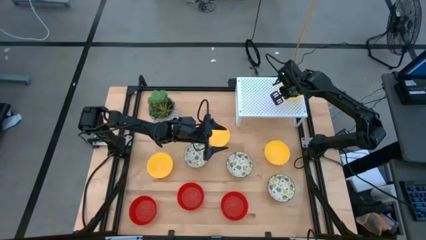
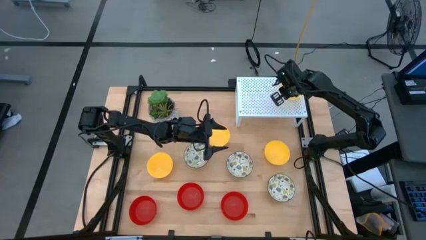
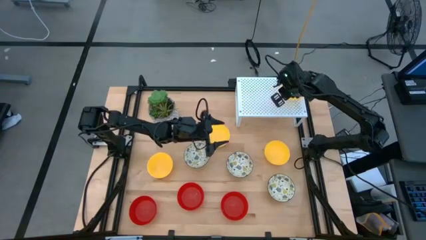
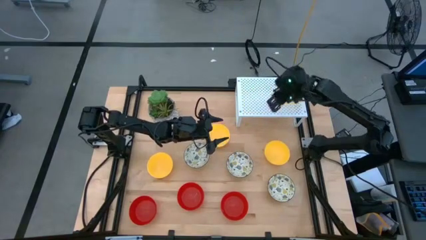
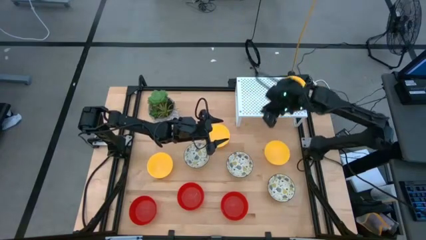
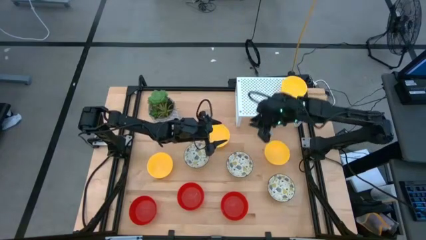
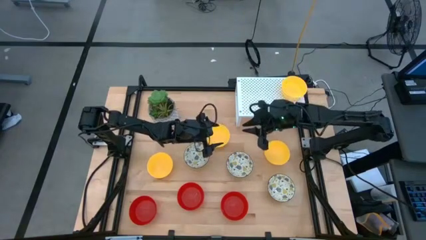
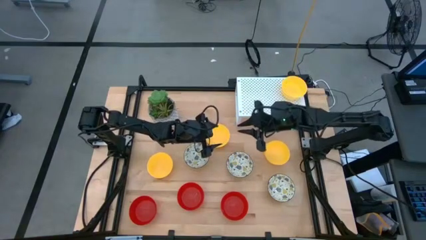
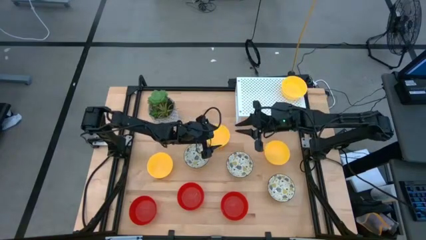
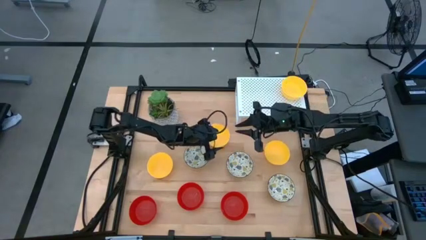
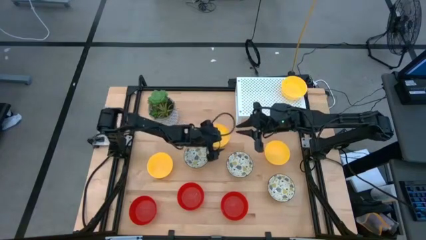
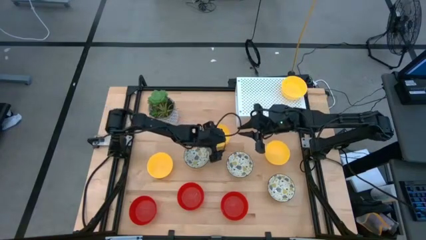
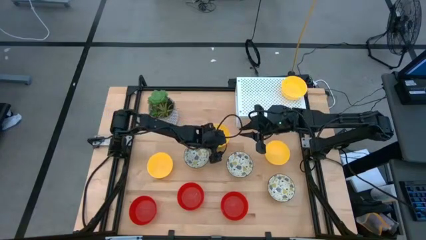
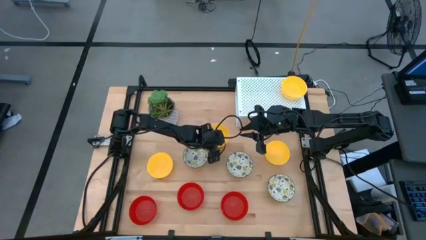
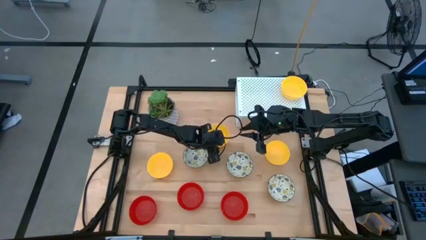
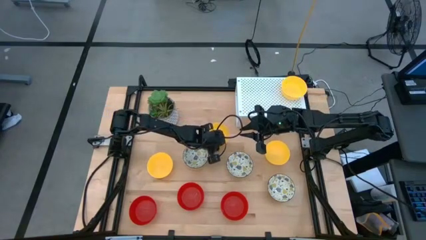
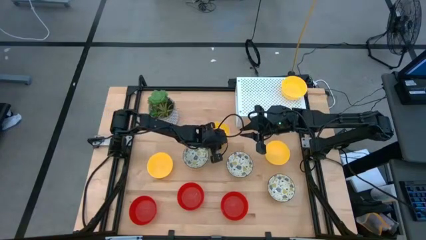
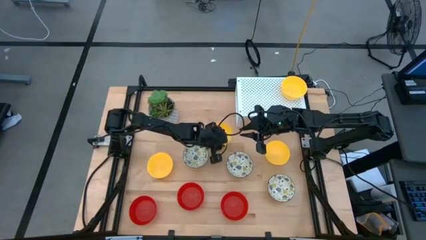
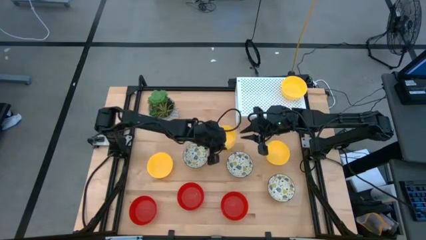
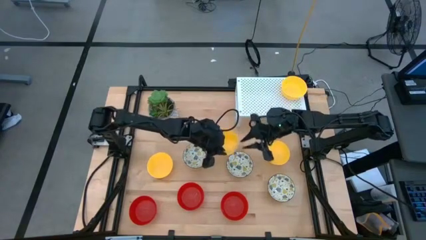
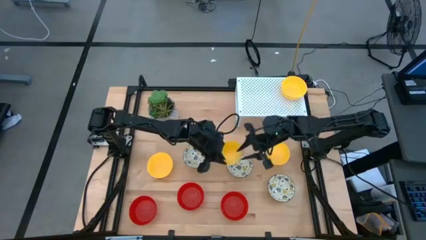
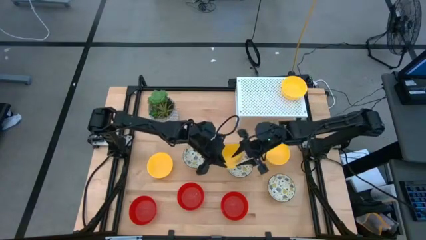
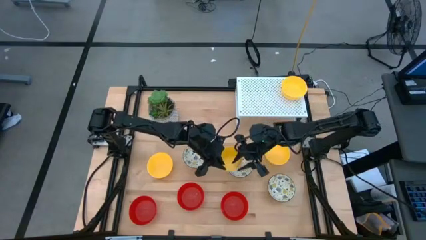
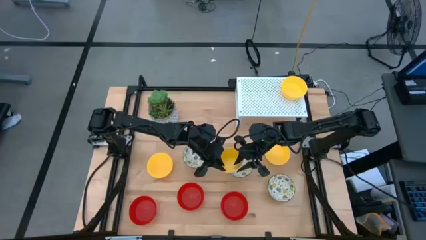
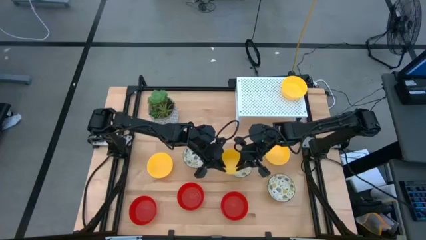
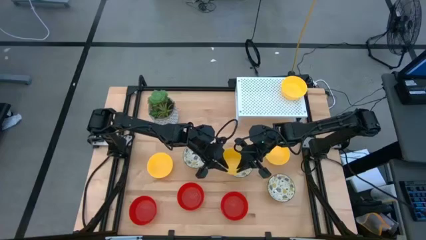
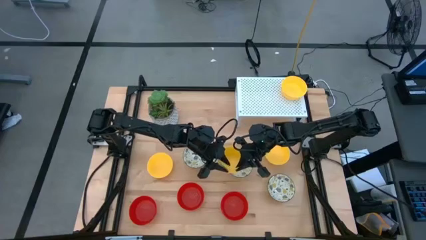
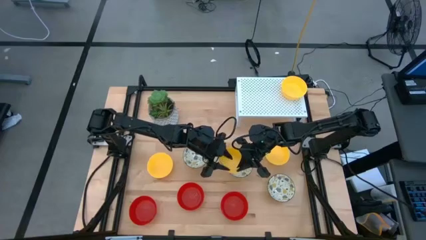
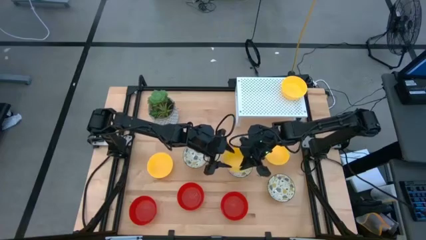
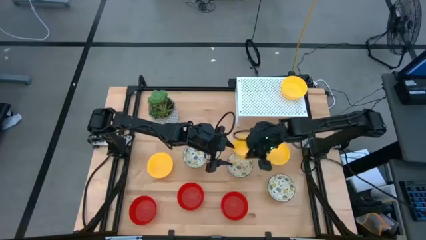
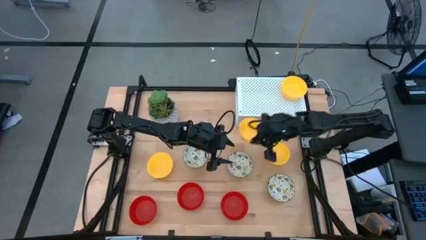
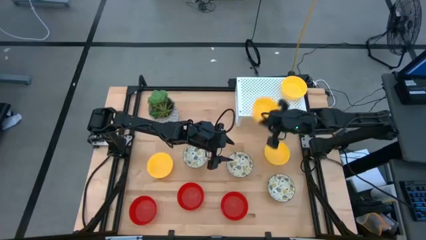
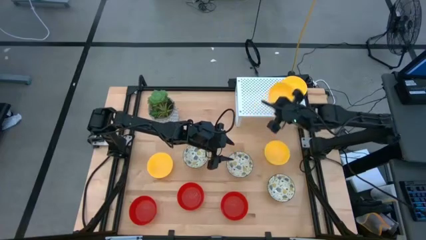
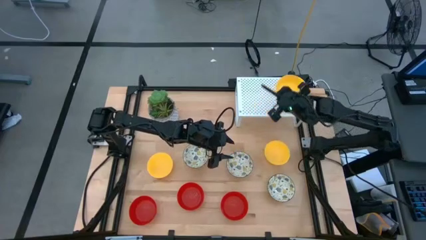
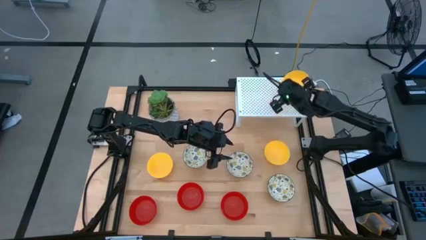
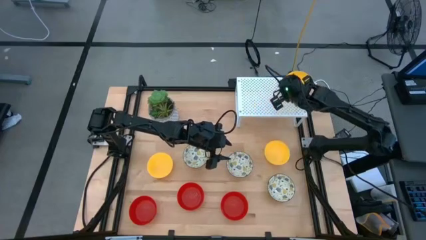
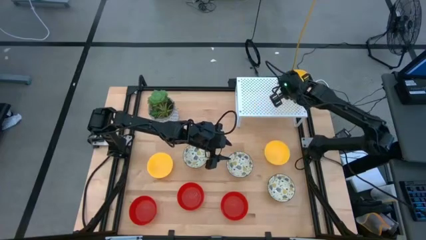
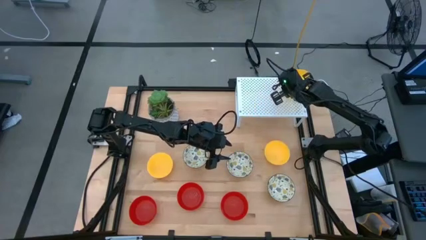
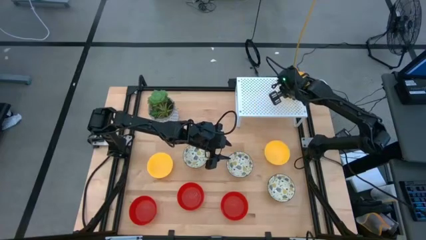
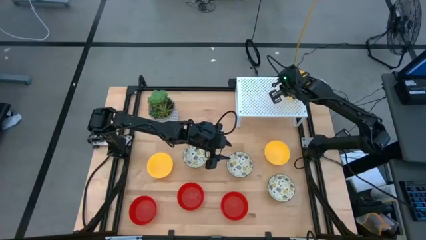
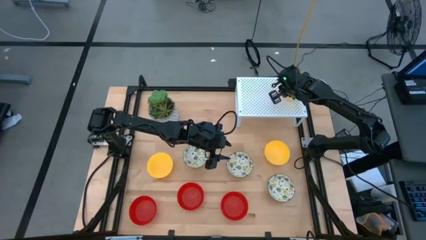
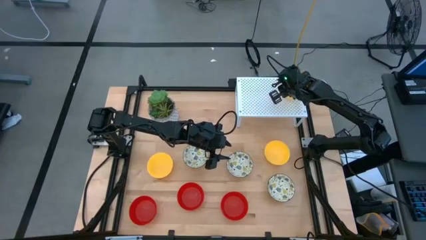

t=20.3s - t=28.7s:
Task: Pick & Place Mini bowls
Stack the yellow bowl on the yellow bowl on the shelf

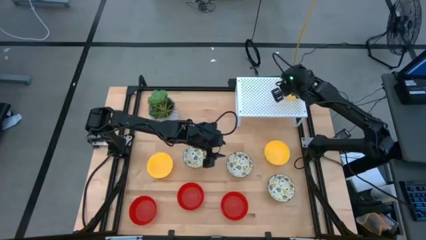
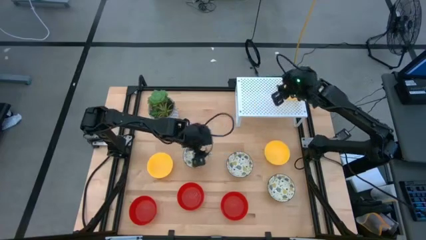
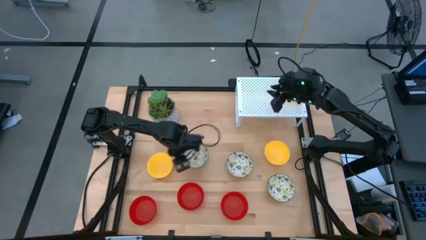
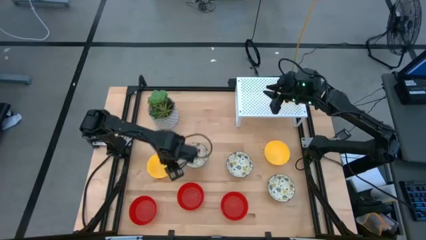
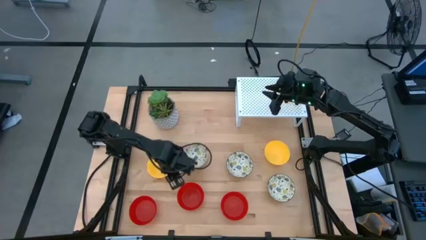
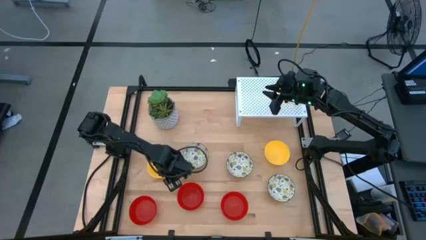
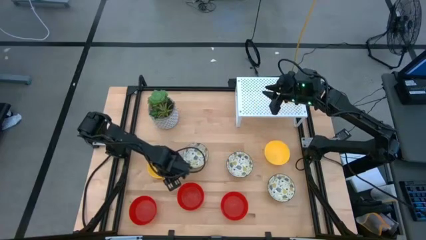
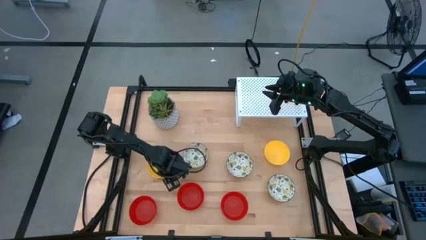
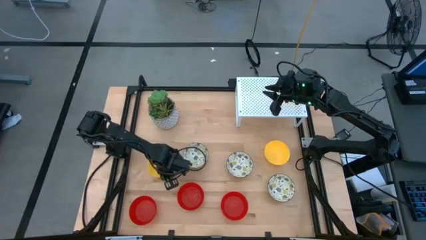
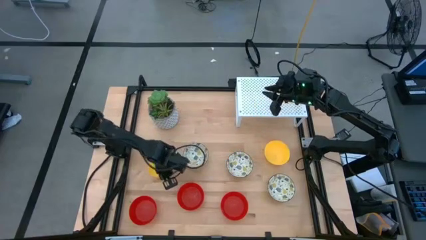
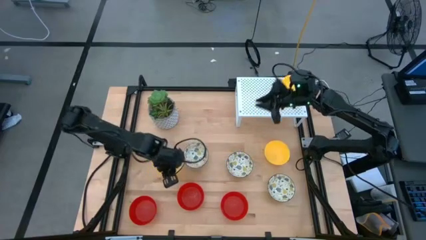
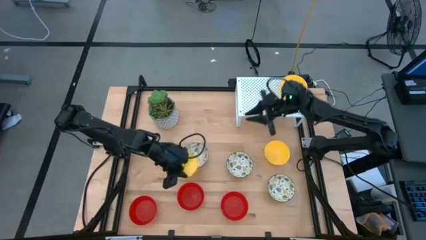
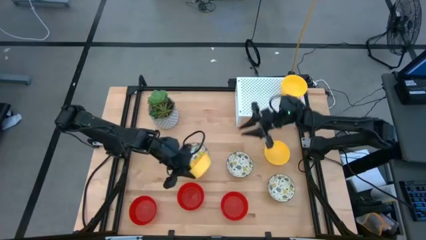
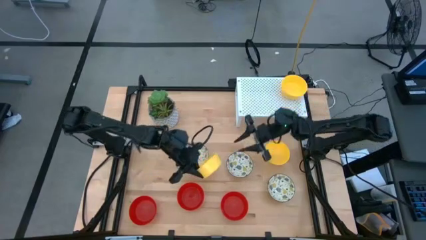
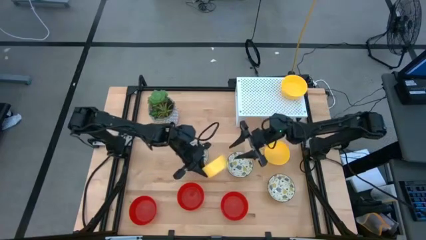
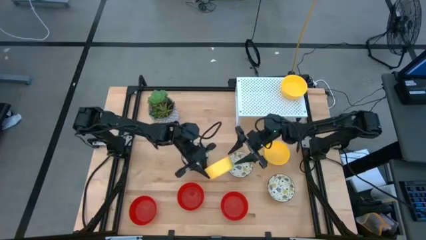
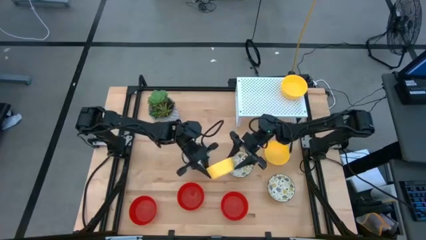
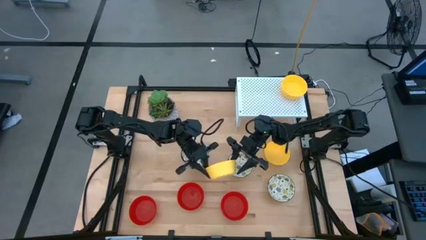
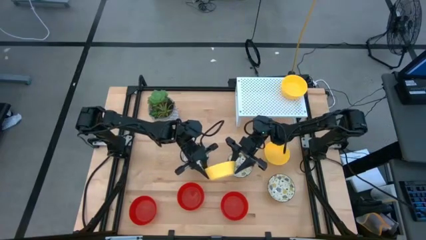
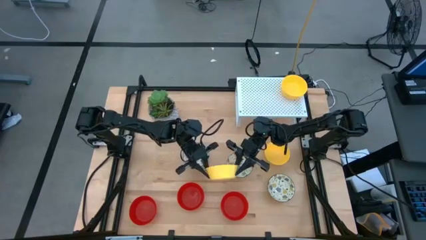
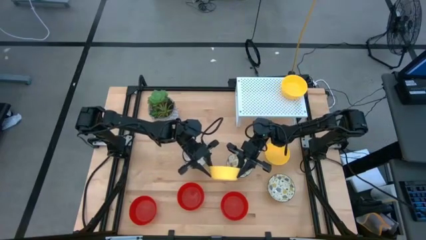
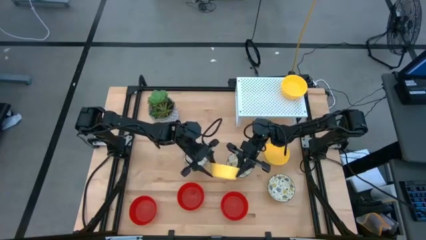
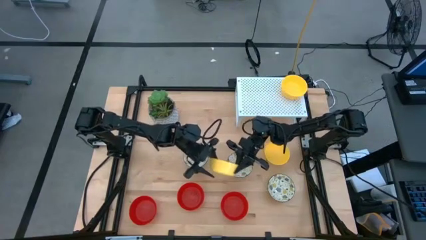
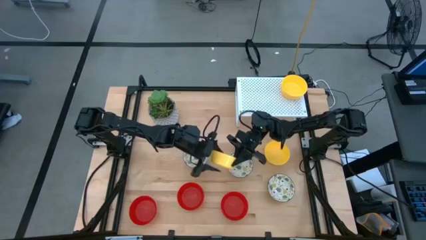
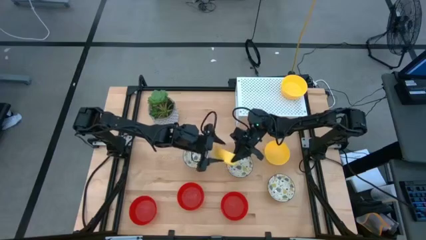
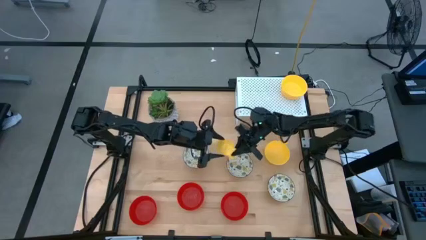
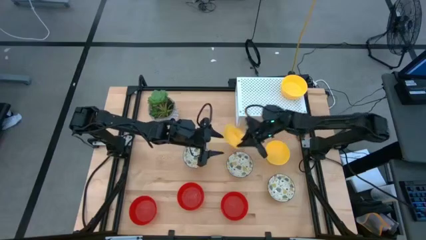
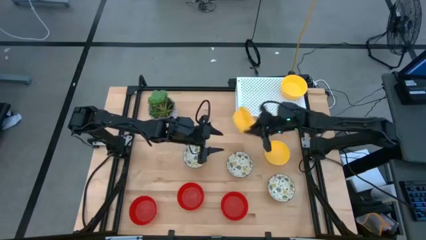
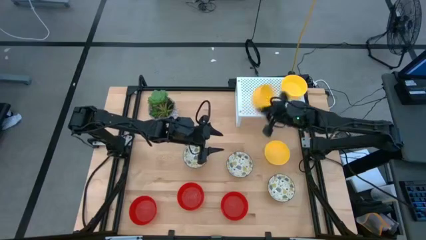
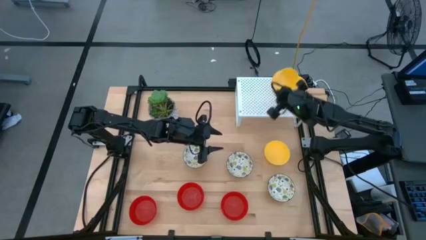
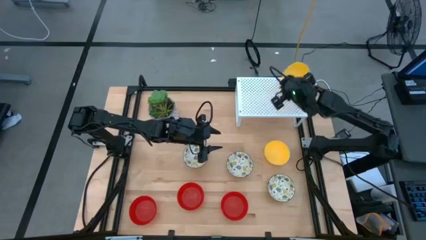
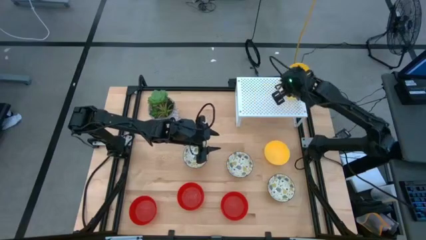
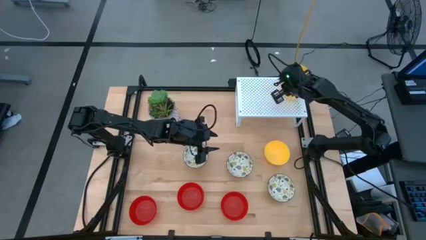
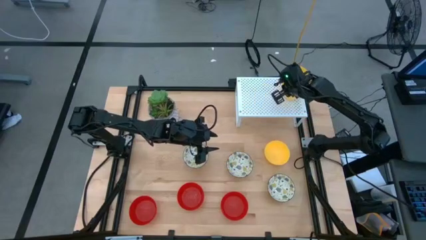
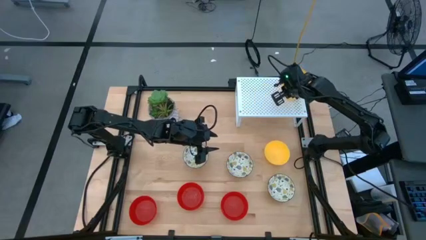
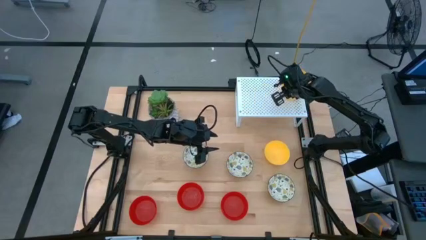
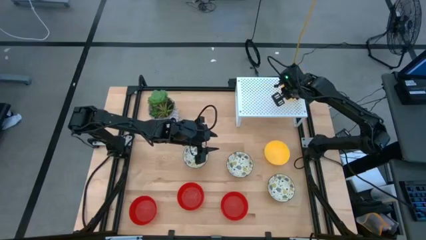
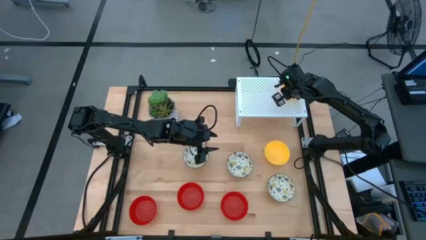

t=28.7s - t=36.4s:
Stack the yellow bowl on the yellow bowls on the shelf
